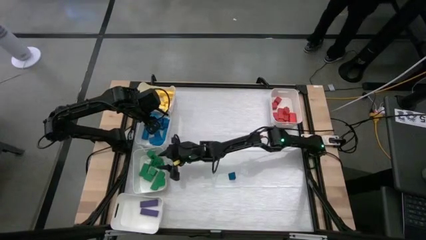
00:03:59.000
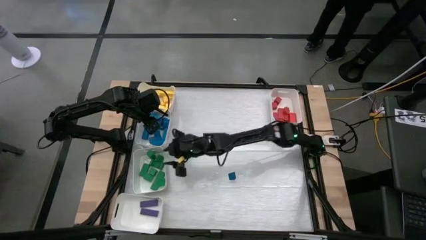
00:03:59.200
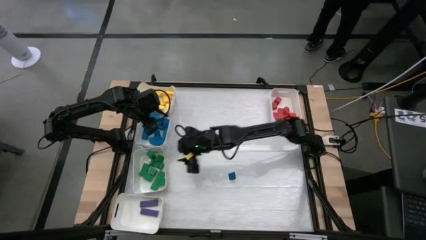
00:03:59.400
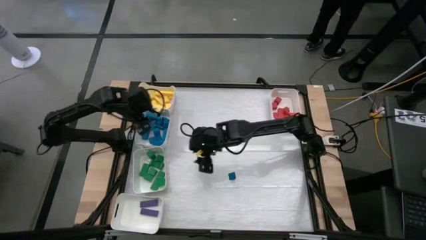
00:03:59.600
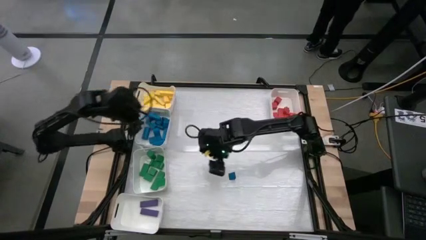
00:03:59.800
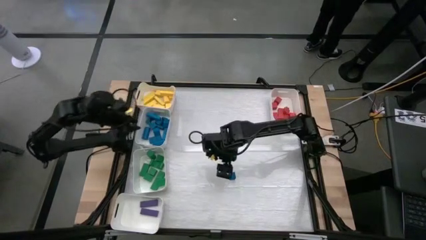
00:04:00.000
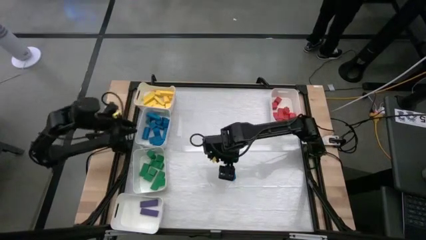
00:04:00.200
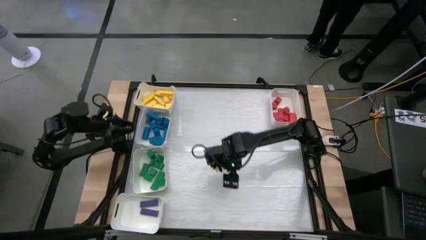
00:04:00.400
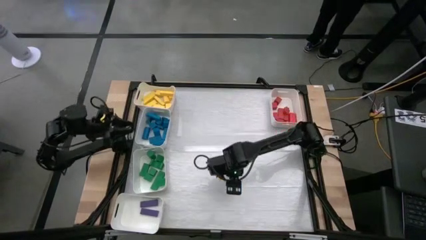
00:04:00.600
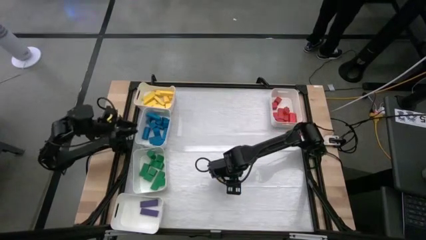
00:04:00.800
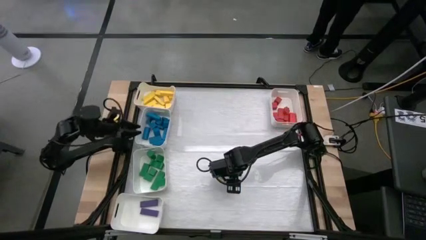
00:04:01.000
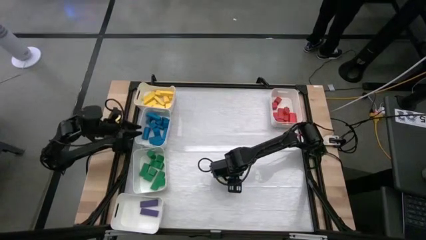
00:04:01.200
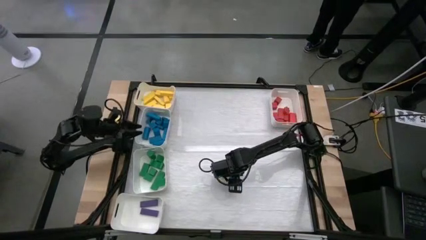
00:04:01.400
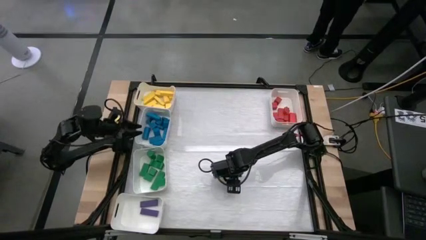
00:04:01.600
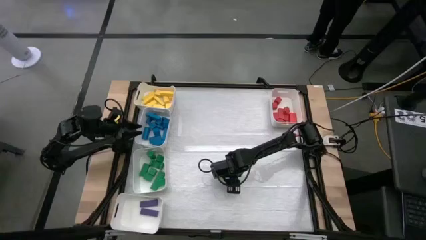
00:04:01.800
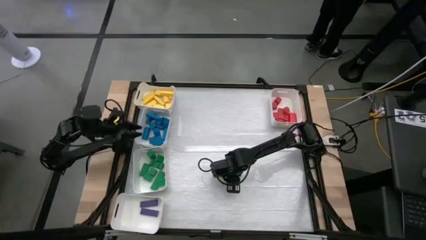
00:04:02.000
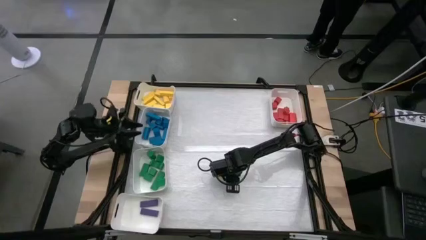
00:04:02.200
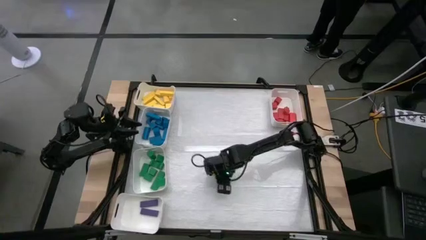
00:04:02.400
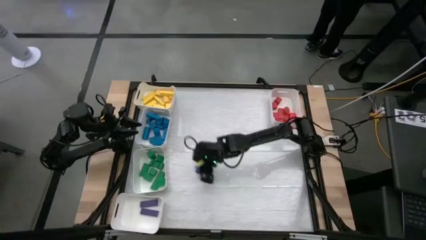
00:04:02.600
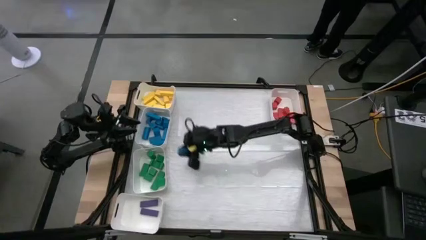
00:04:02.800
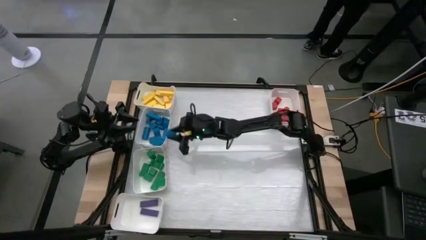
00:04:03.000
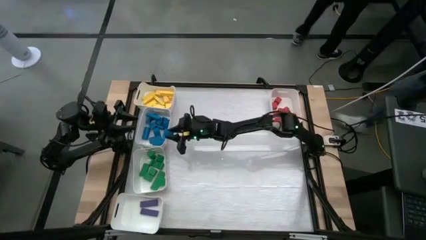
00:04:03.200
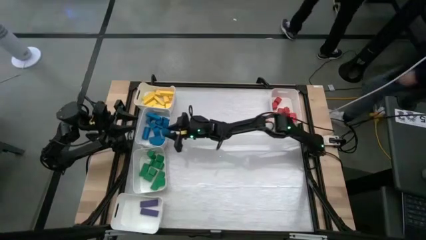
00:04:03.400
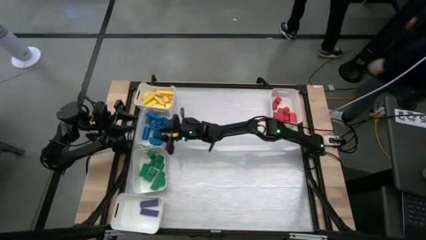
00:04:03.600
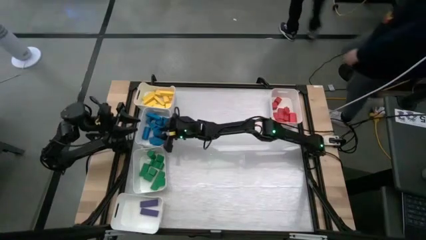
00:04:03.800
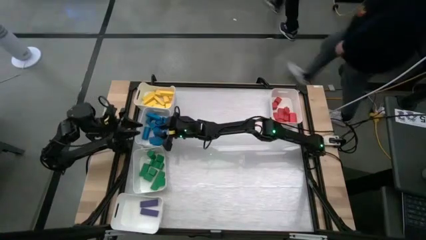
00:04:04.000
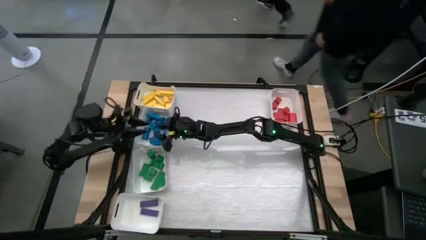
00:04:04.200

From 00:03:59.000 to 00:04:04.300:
Task: Sort blocks
Put the blue wooden block into the top middle left white bin

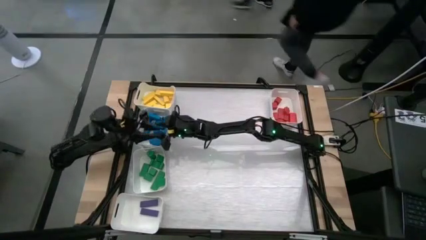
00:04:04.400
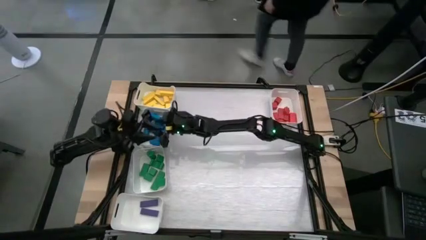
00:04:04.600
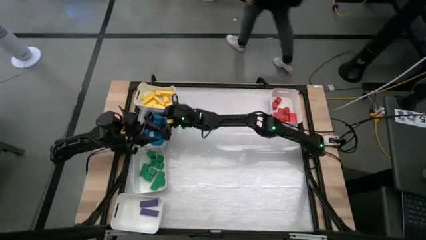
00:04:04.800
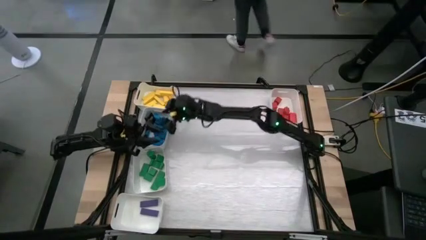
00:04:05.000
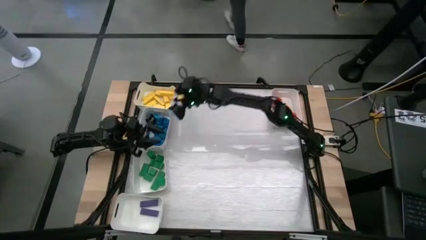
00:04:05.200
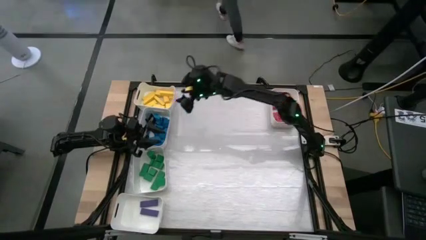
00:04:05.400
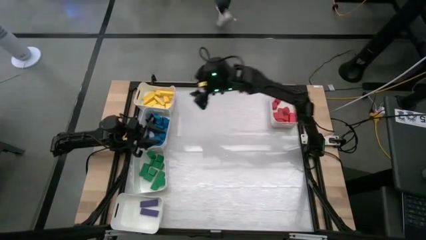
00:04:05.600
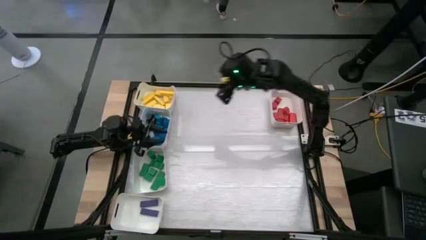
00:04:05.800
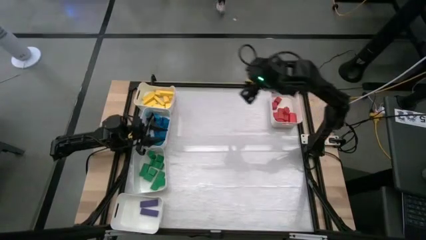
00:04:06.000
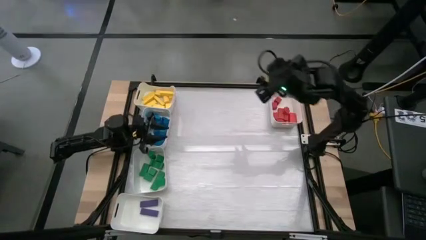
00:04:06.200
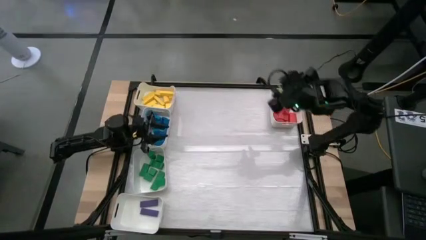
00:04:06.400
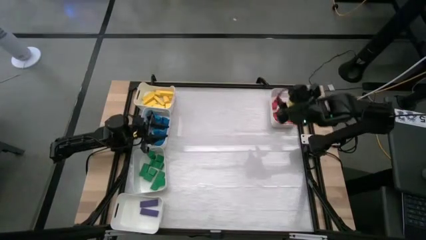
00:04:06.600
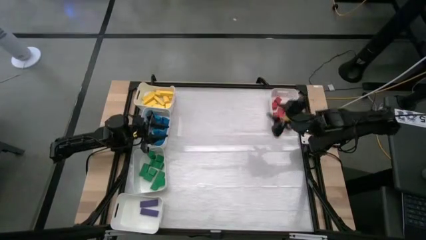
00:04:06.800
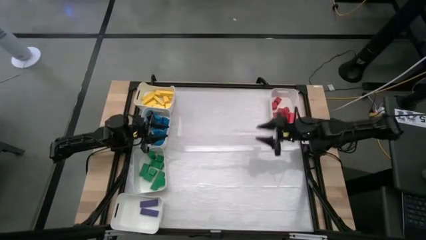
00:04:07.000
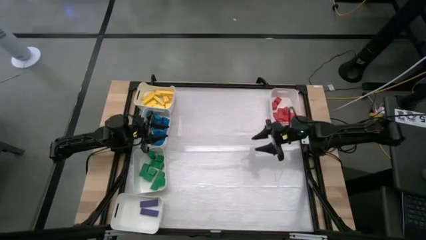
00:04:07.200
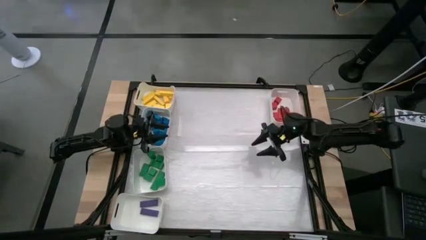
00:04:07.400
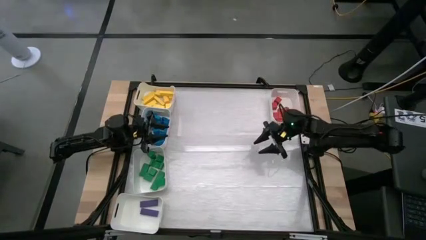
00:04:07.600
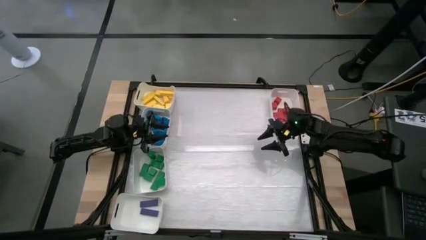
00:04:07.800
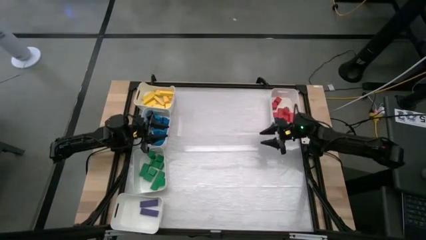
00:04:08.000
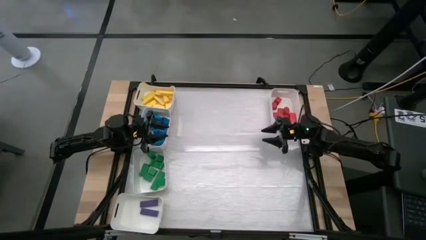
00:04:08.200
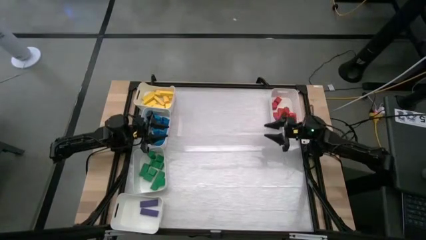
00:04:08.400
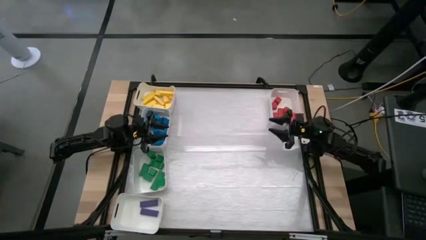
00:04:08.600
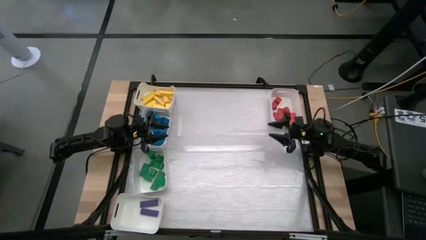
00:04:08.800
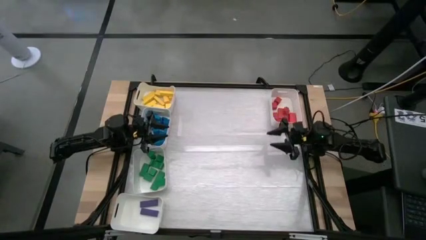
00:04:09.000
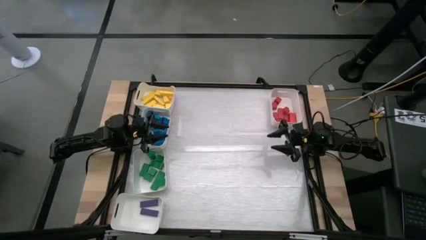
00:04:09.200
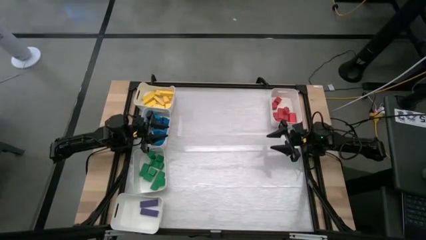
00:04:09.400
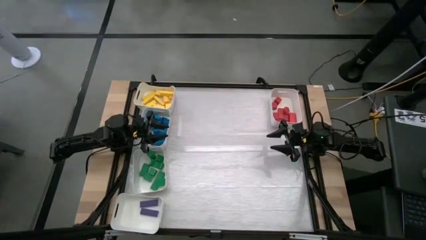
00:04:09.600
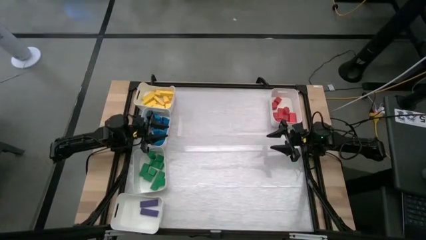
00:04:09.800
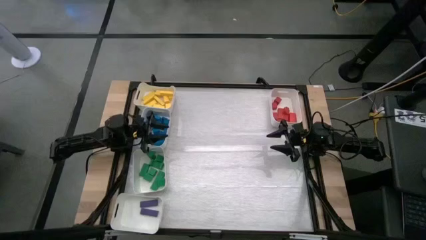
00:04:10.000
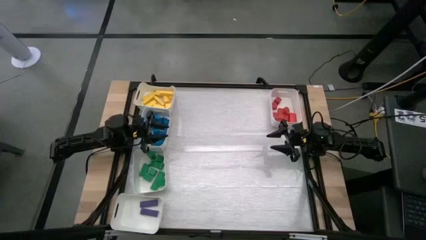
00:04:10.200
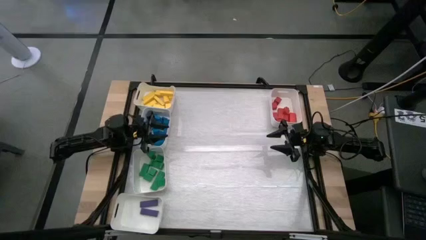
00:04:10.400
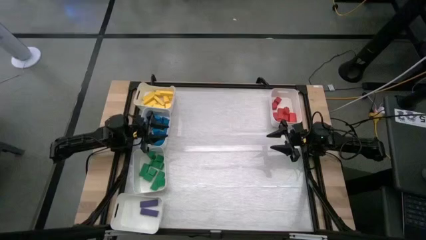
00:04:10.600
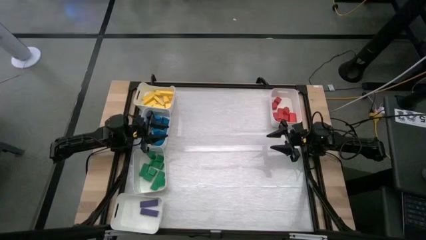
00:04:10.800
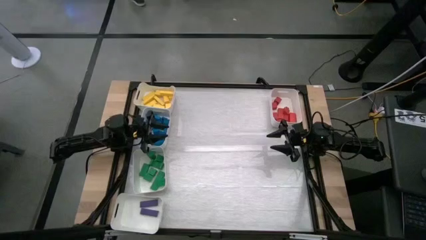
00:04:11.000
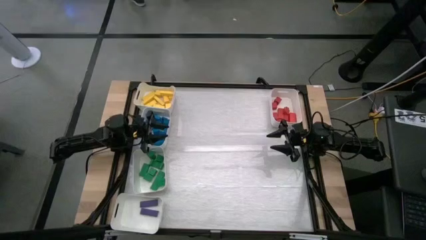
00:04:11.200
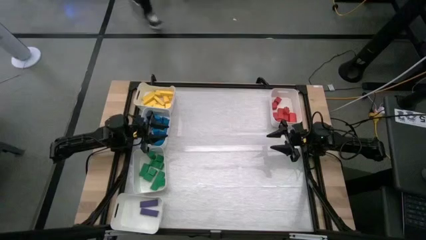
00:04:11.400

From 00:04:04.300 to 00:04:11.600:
Return to Home Position

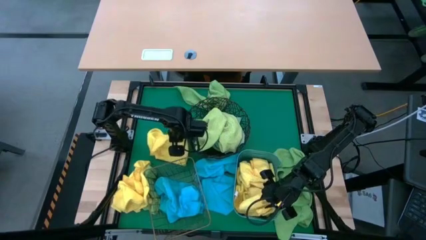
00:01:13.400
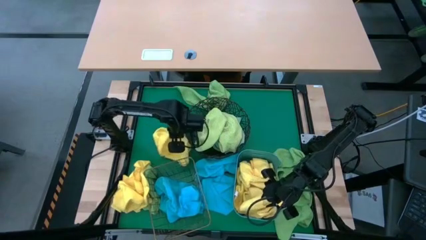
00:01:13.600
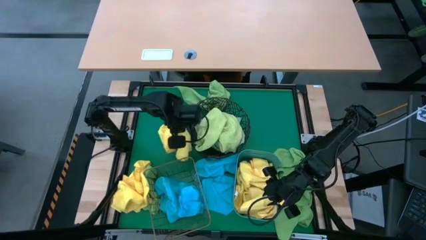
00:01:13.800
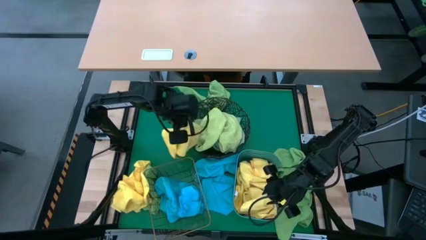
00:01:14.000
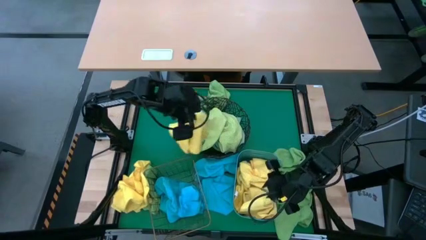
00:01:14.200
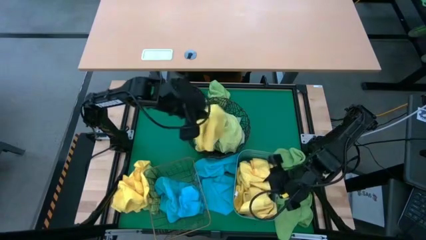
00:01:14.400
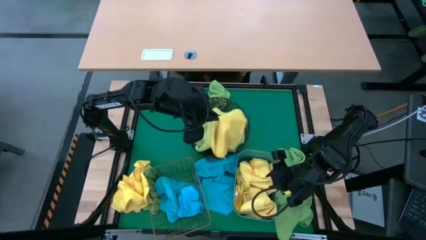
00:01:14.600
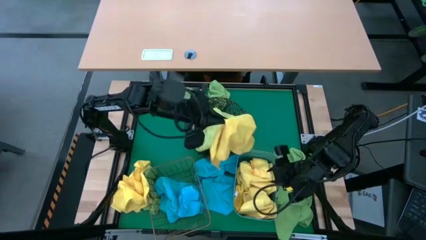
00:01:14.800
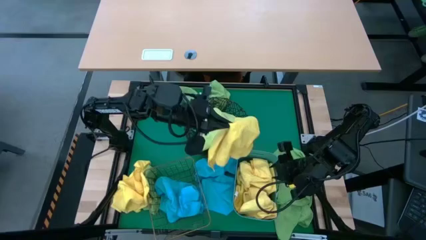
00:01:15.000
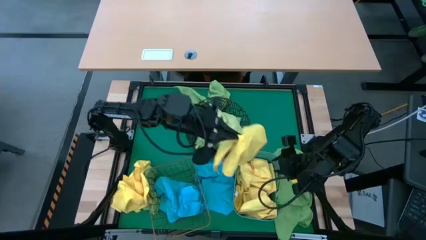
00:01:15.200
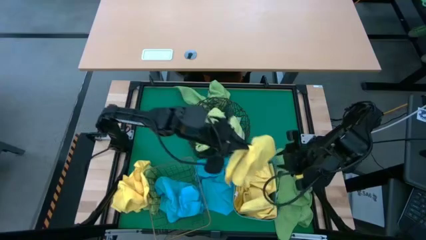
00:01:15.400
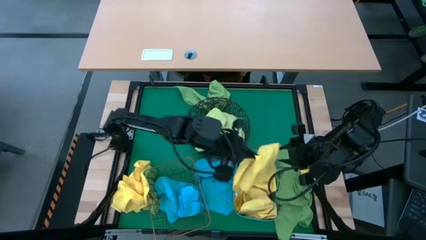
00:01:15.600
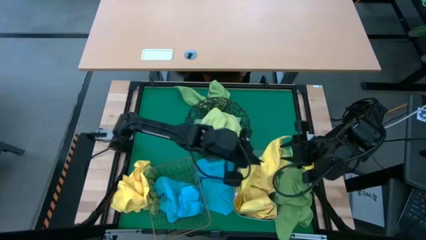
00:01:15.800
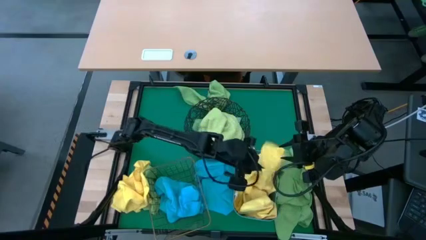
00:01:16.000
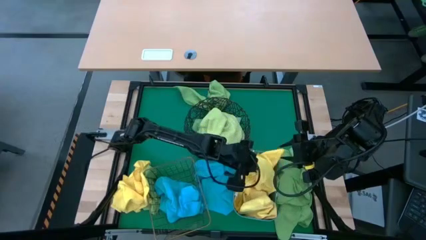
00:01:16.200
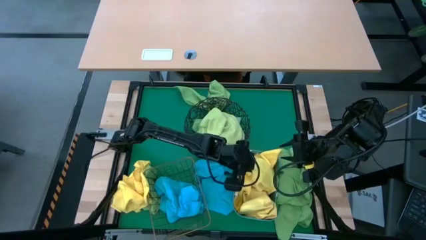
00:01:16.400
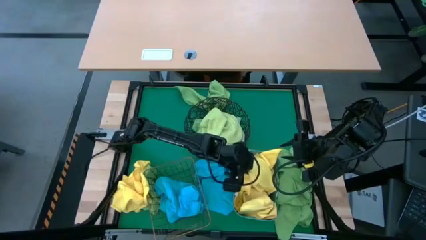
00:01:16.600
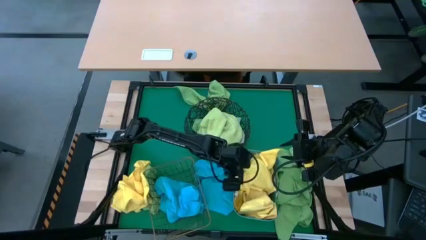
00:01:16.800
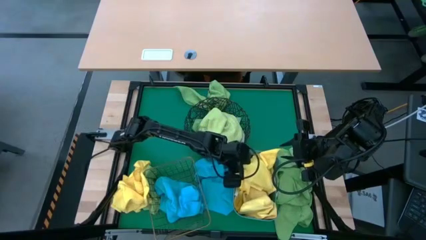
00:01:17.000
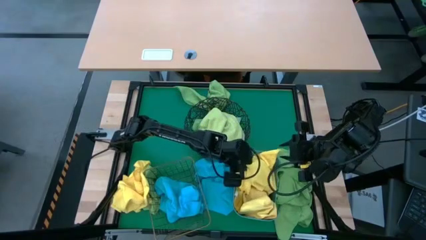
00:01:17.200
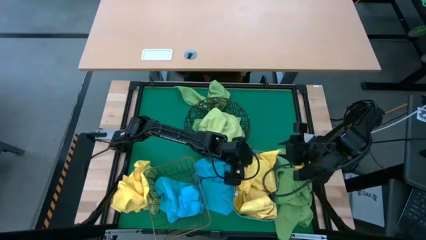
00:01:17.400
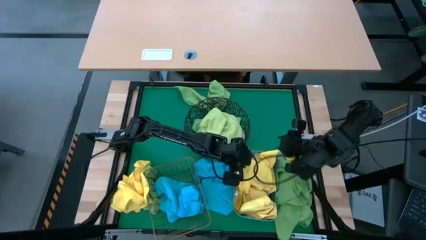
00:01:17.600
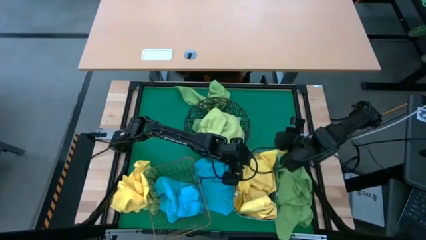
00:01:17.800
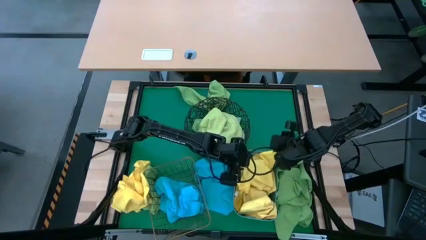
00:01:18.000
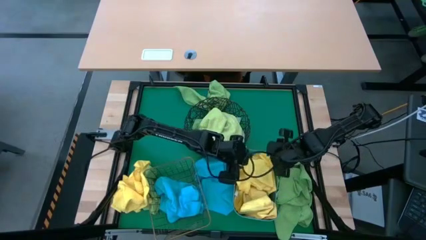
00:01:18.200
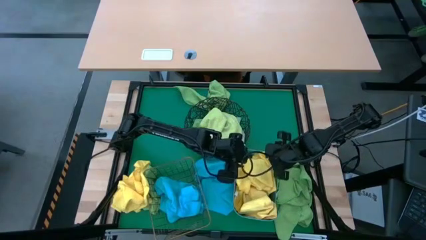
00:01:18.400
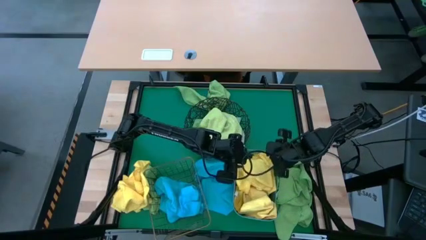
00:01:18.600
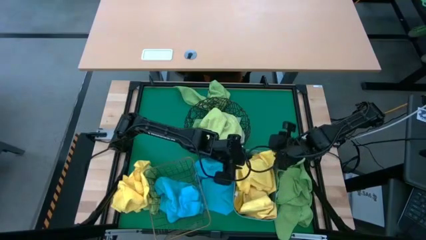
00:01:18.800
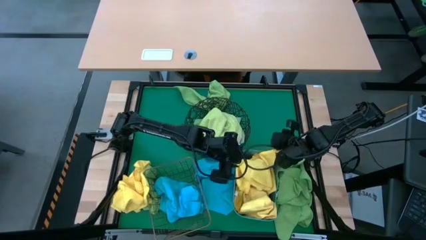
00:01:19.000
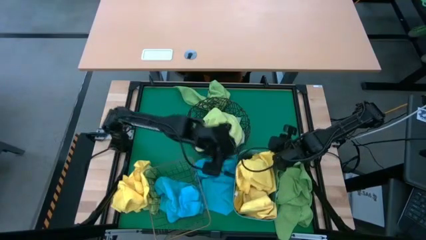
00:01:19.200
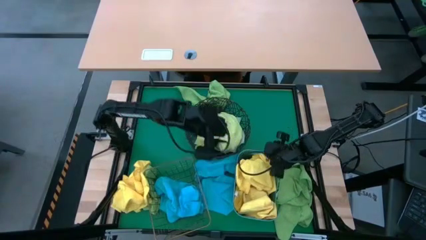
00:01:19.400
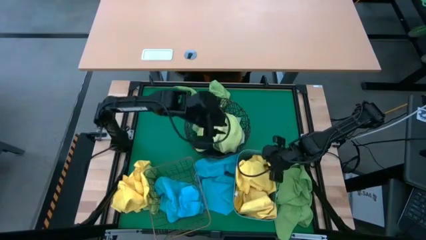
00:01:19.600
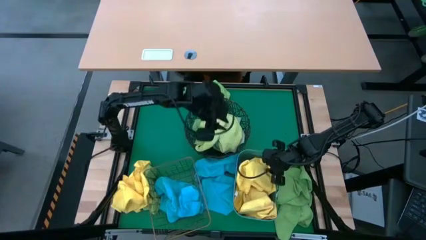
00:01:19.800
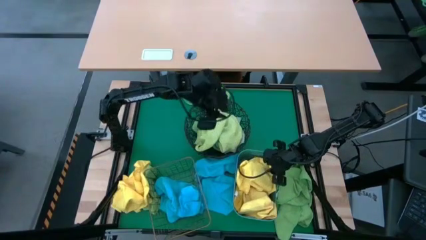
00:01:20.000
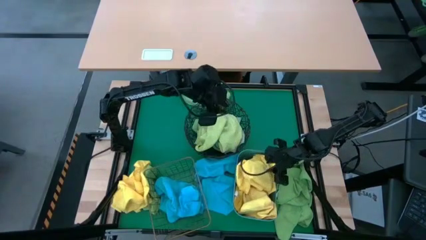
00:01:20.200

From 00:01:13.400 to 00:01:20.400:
Task: Sort microfiber towel by color & place in baskets
Put the yellow microfiber cloth into the blue bin
